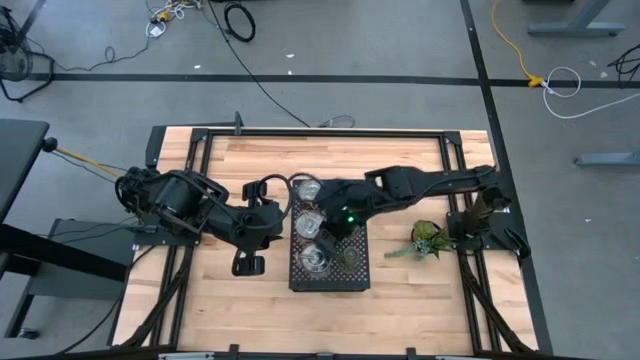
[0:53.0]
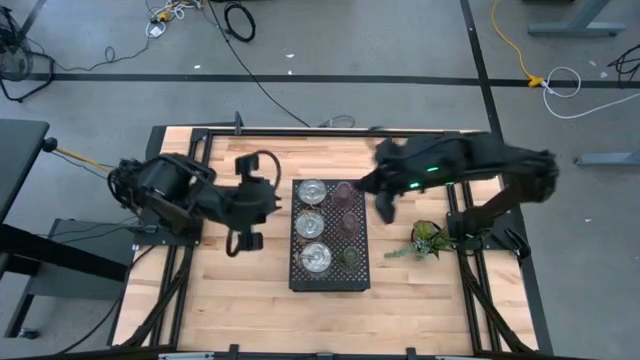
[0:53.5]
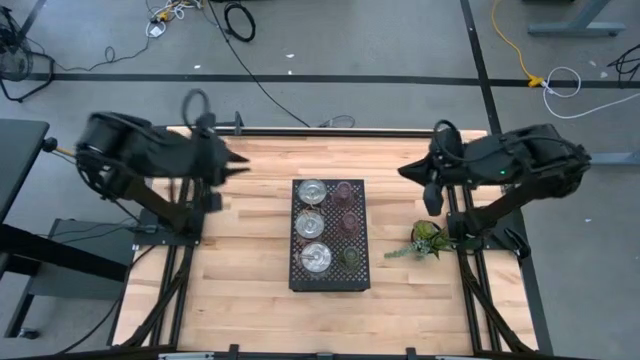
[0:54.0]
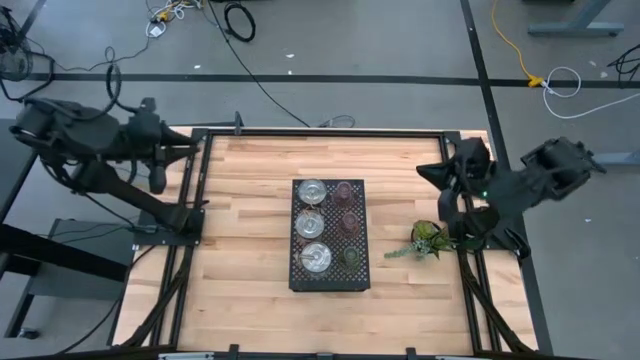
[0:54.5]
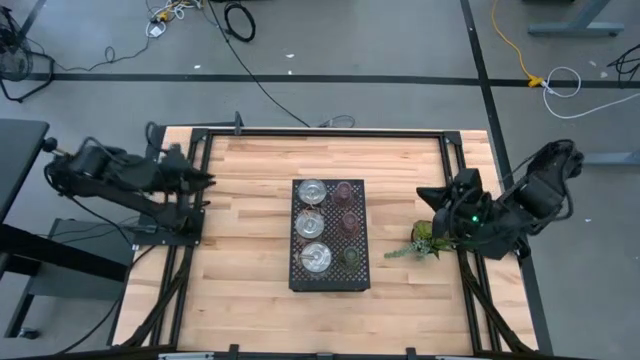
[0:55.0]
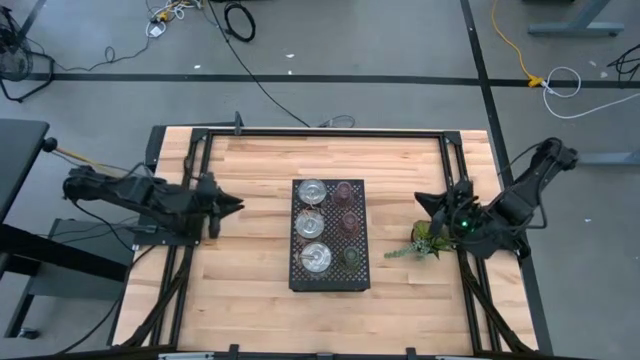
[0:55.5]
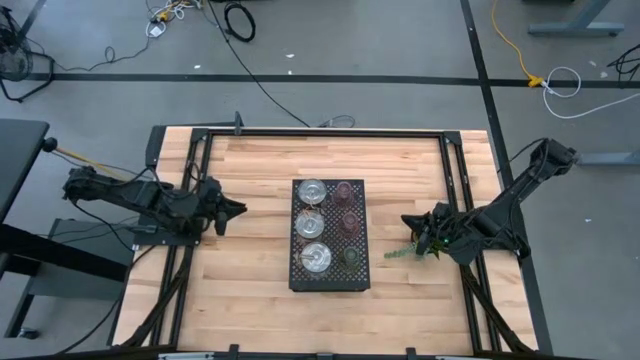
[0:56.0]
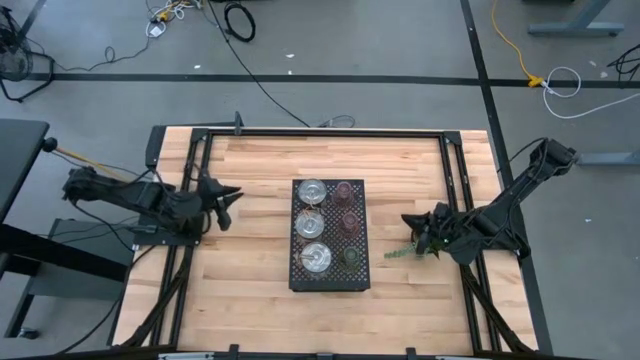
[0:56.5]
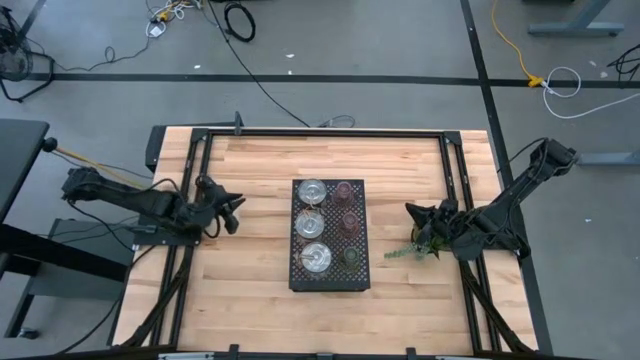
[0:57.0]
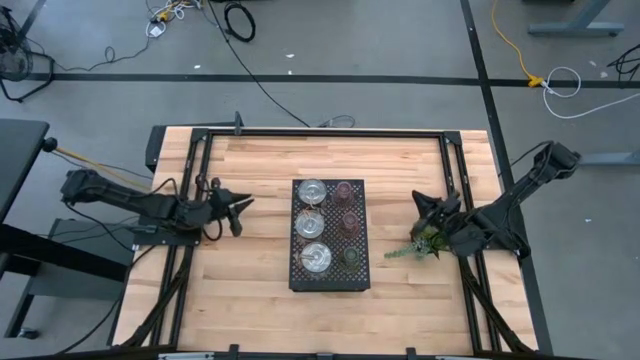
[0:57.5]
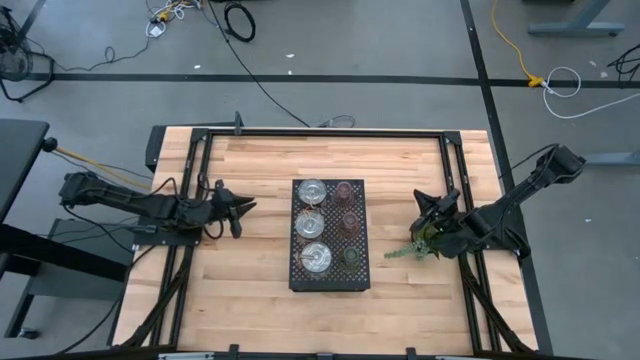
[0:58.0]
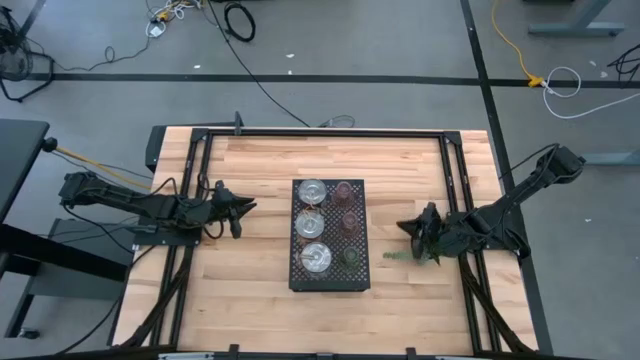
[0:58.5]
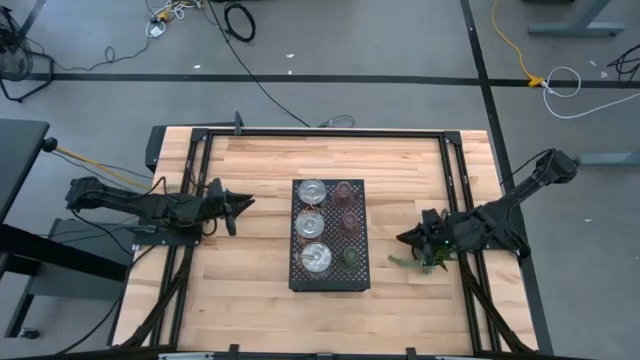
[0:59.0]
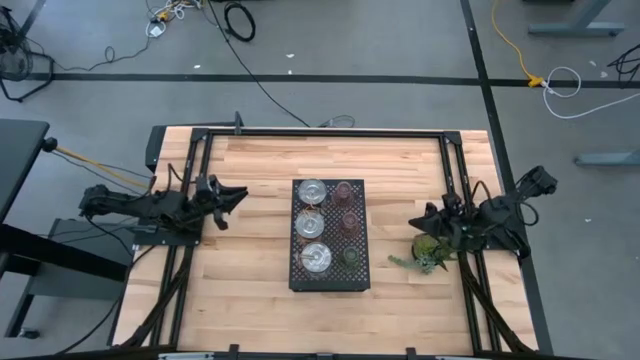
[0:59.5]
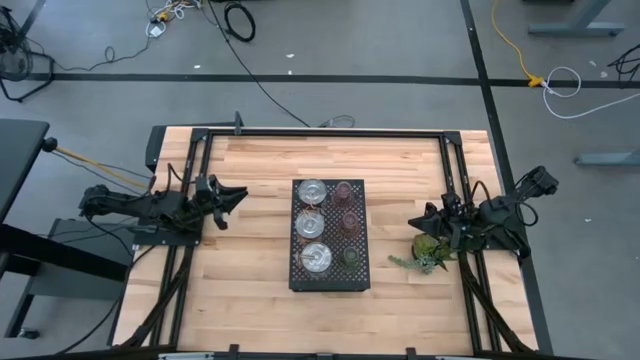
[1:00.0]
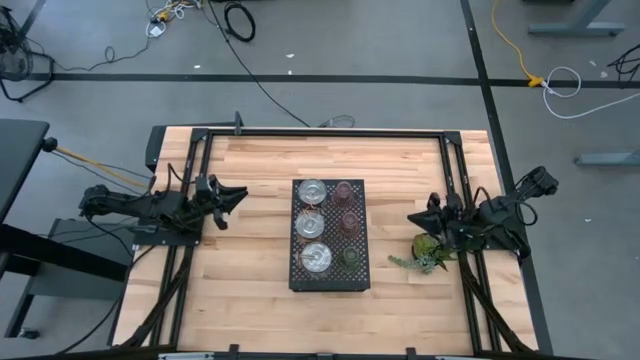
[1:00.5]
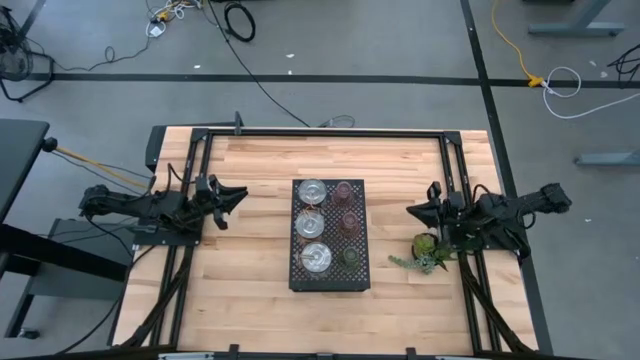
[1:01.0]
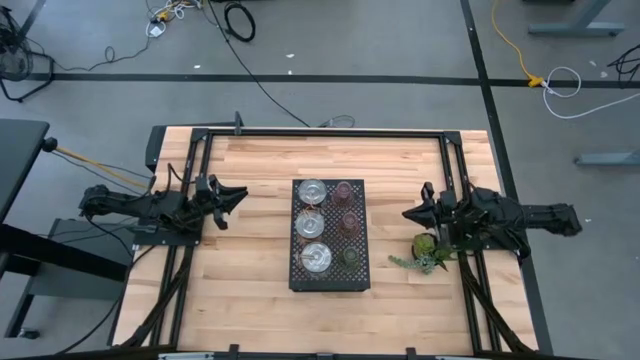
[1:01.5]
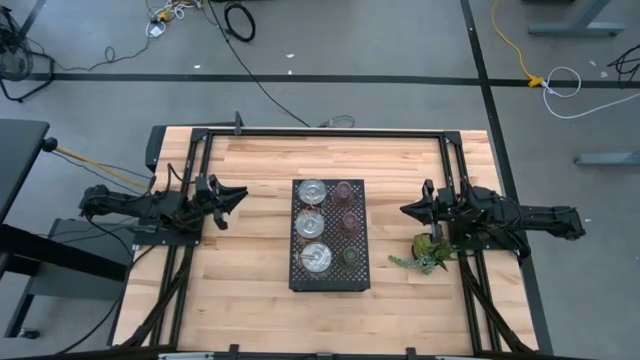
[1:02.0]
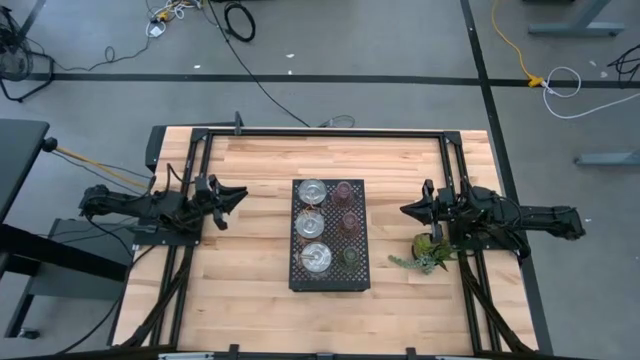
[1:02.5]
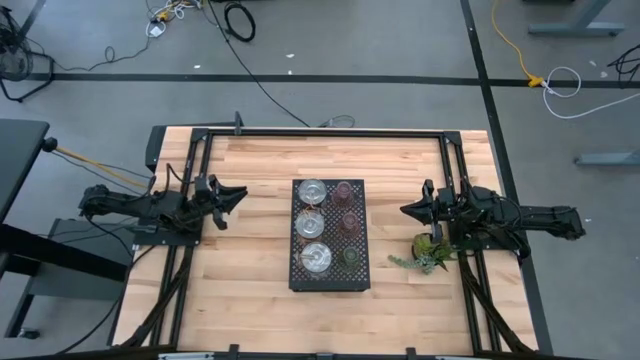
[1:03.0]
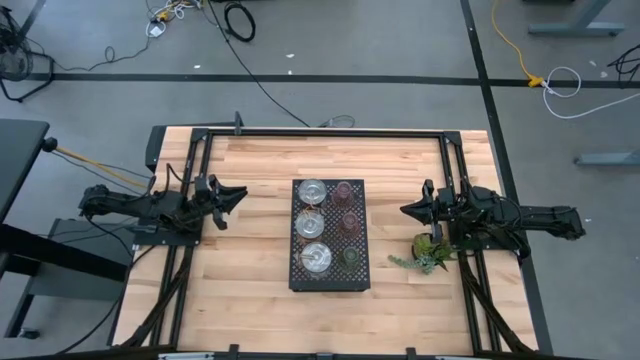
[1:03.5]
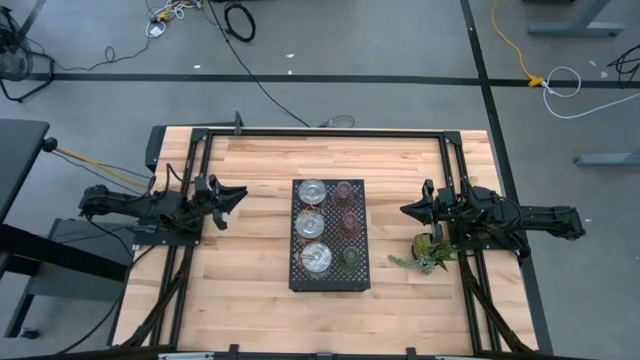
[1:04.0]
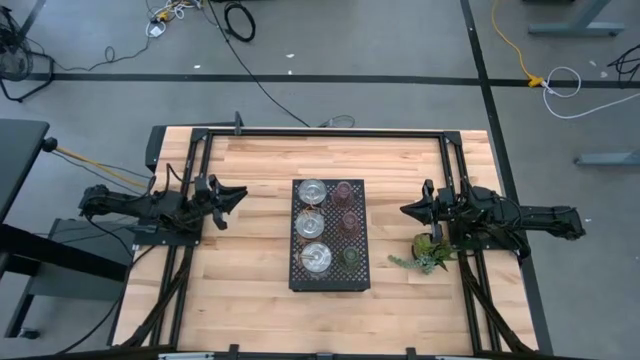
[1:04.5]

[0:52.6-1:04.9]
Task: Pick & Place candle stick holders
Return to Home Position

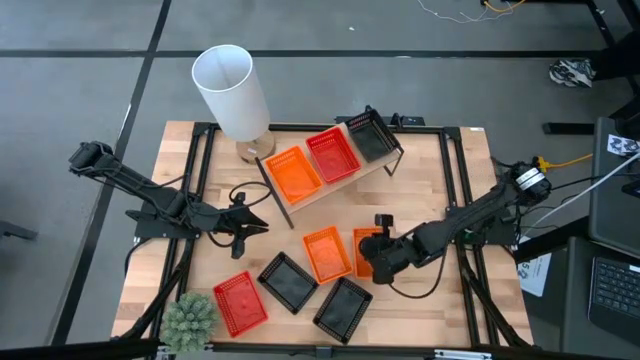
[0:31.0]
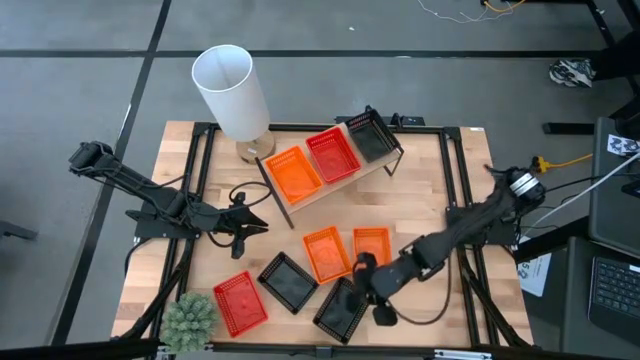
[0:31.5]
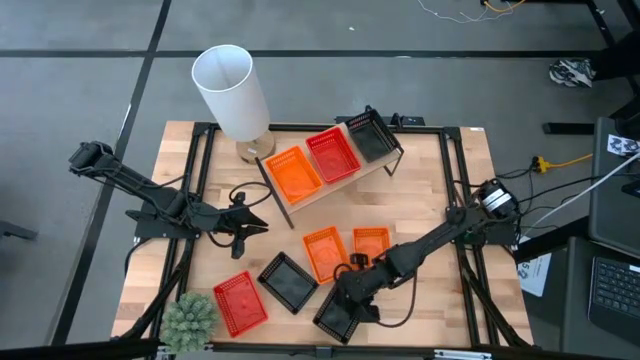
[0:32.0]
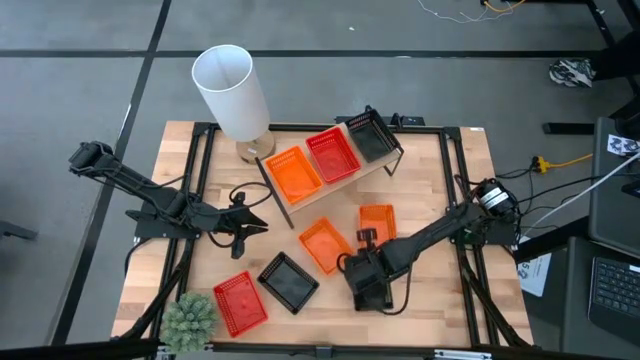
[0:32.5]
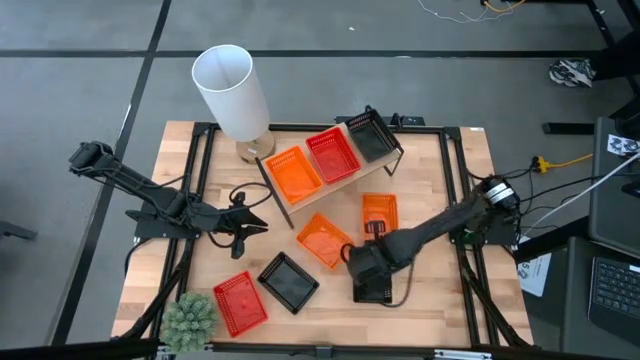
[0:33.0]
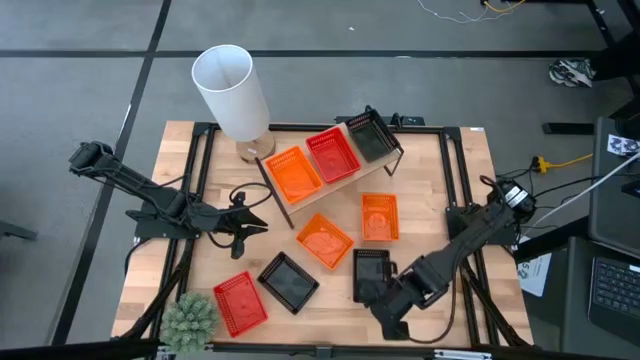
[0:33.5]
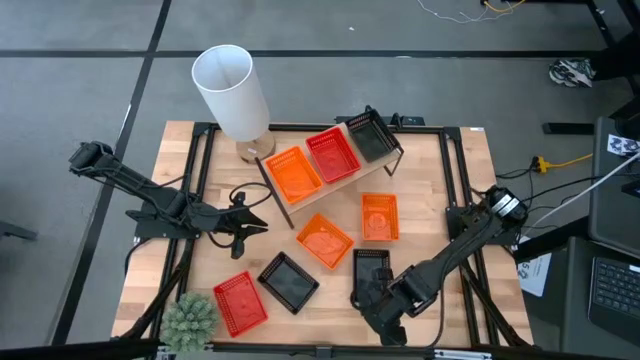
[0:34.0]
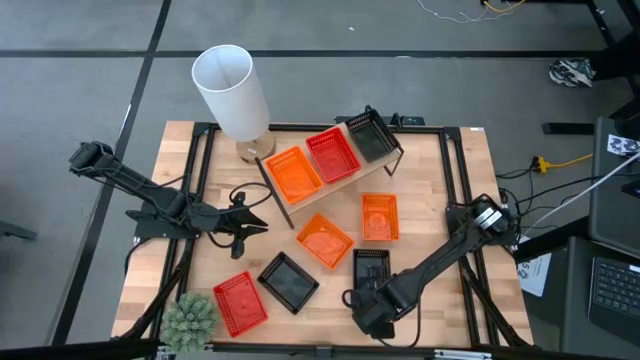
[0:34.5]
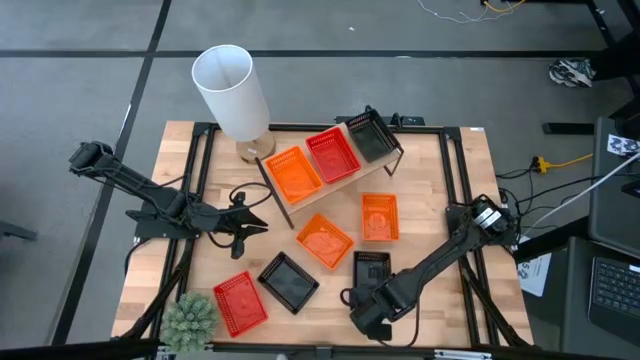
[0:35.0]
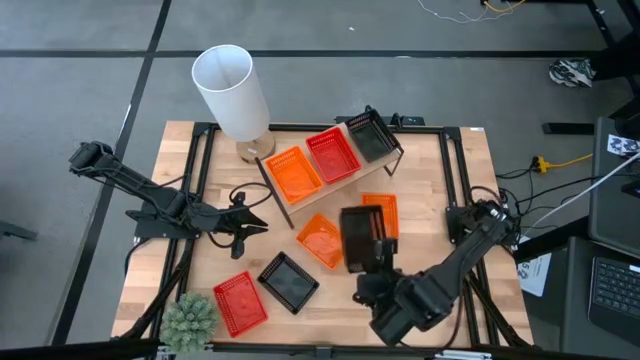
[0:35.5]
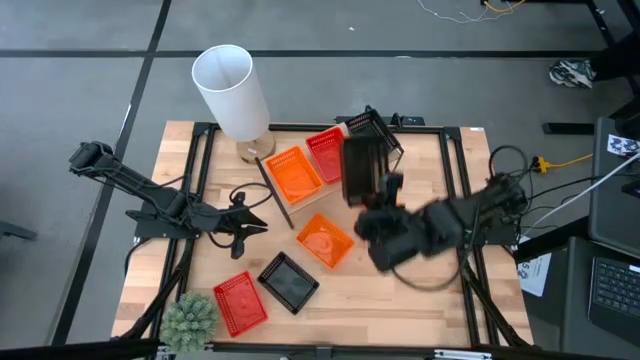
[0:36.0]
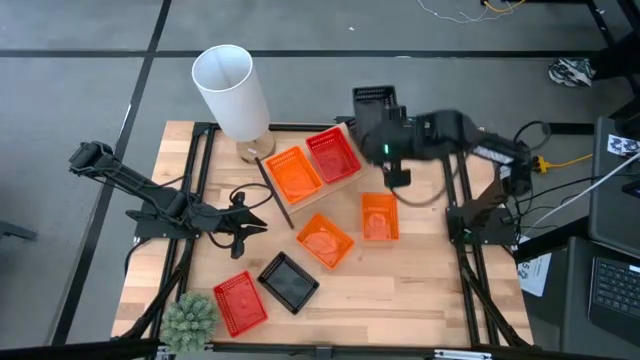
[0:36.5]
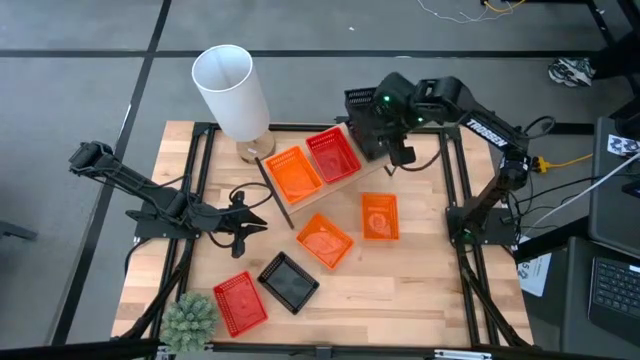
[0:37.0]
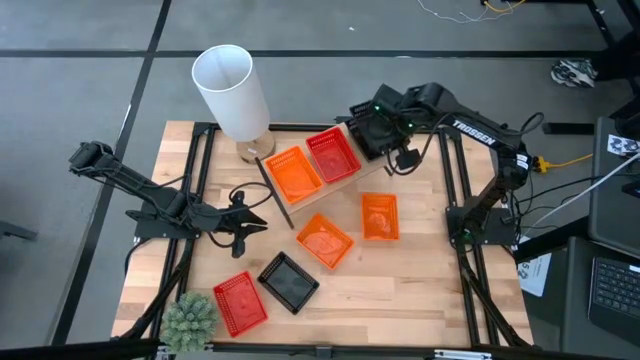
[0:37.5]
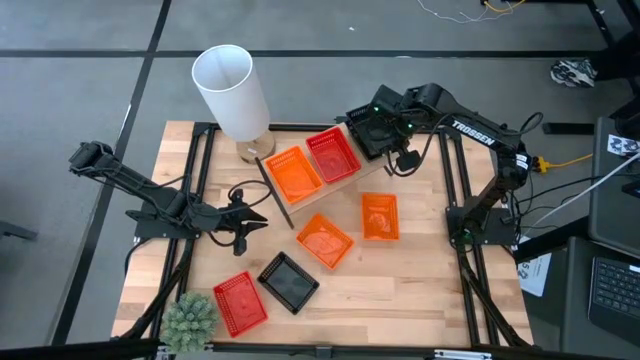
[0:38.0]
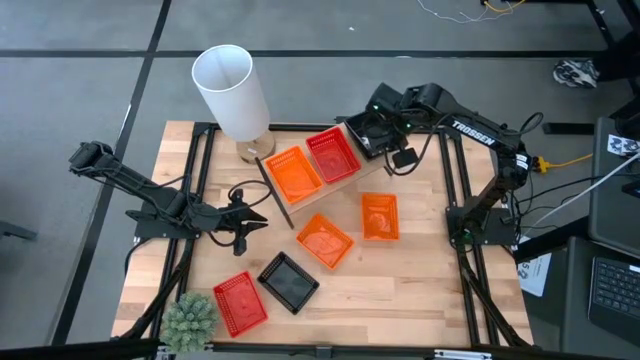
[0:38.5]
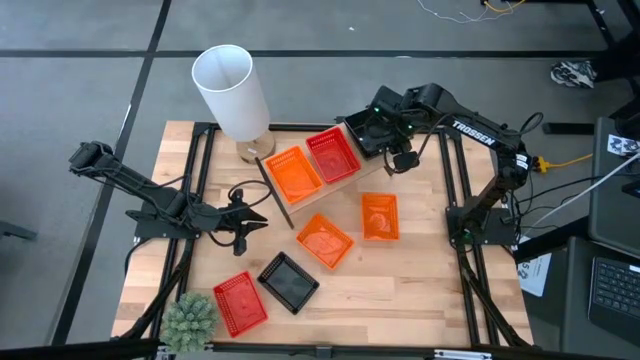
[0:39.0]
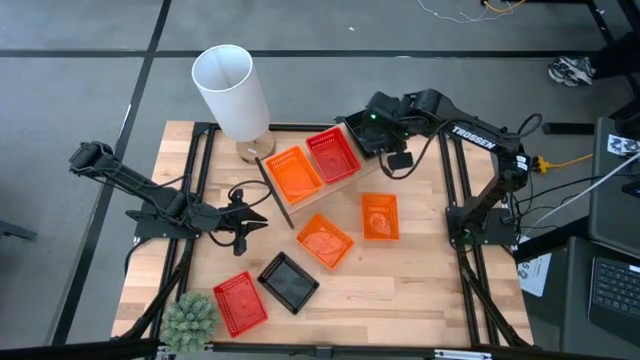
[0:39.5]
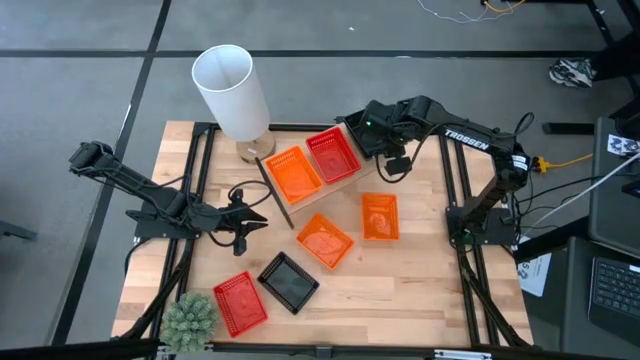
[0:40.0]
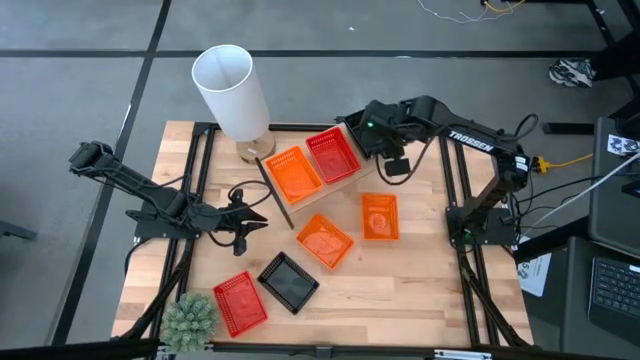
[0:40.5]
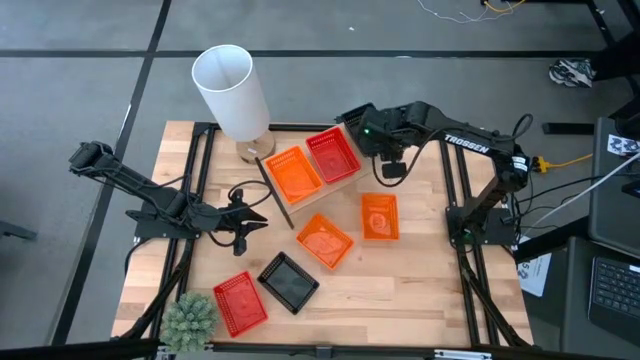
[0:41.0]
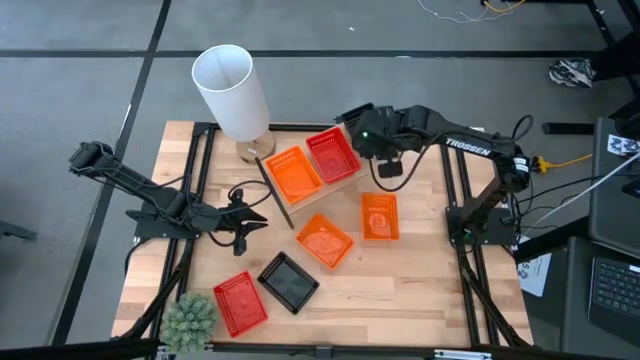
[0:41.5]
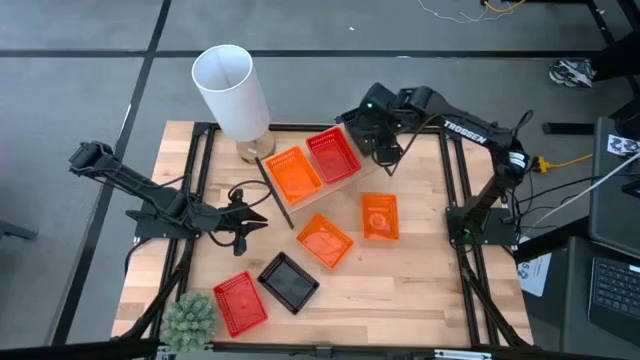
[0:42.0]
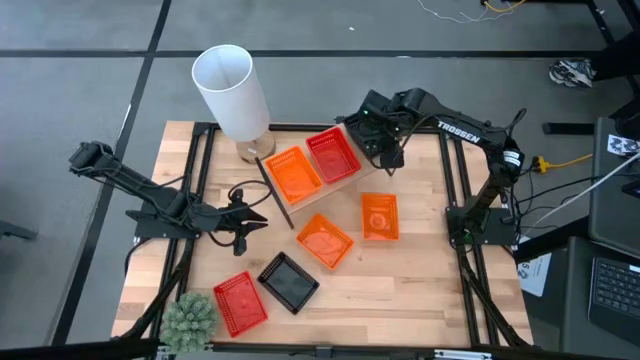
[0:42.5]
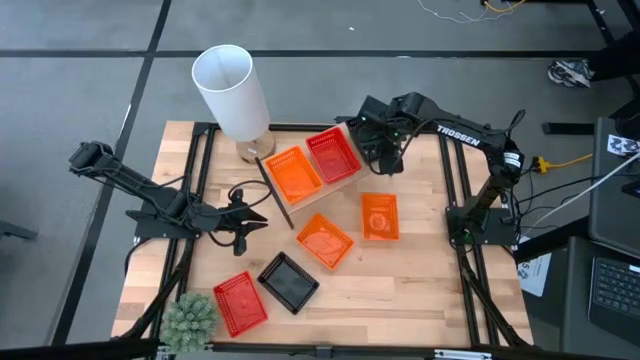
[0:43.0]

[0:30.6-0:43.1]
Task: Stack baskets on shelf by color
Stack the right black basket on top of the other black basket on the shelf
